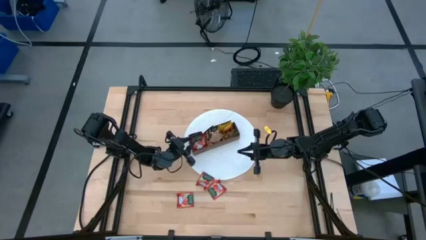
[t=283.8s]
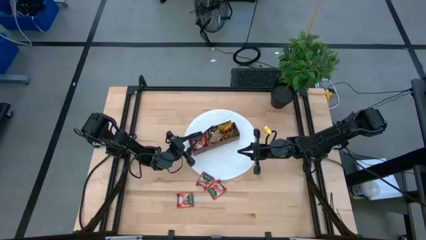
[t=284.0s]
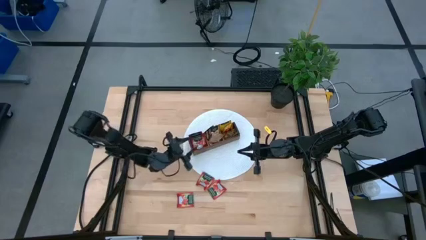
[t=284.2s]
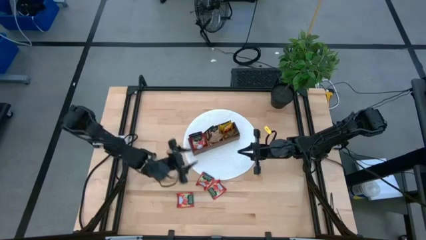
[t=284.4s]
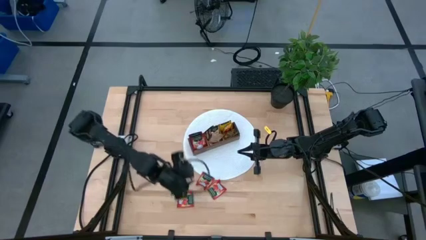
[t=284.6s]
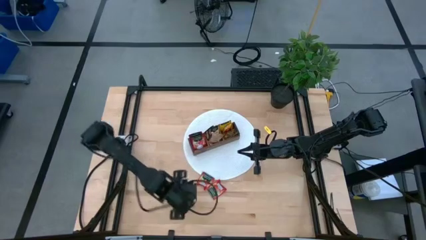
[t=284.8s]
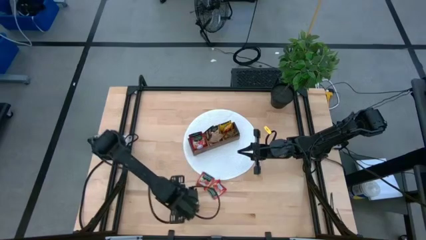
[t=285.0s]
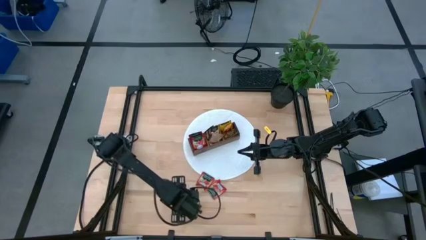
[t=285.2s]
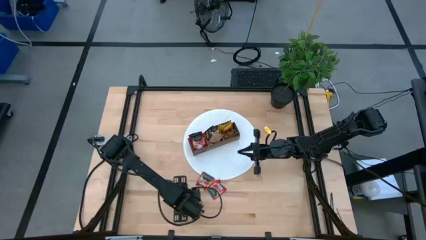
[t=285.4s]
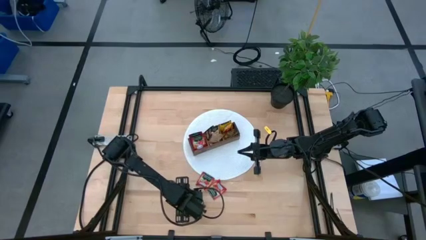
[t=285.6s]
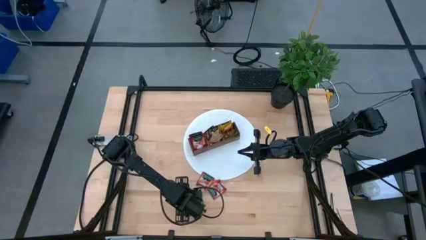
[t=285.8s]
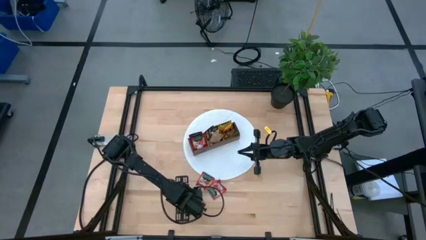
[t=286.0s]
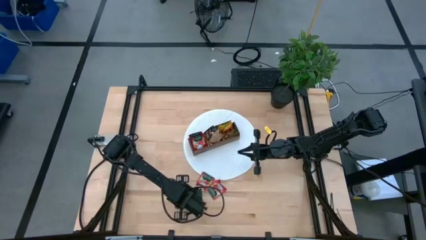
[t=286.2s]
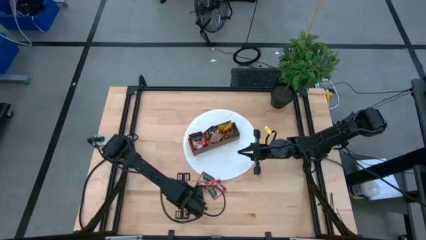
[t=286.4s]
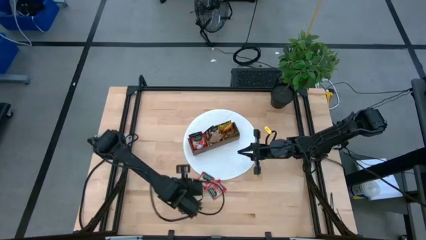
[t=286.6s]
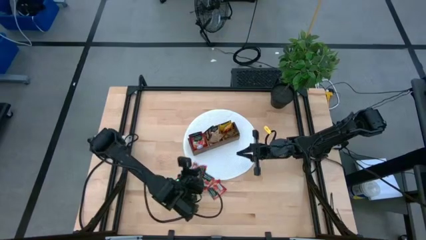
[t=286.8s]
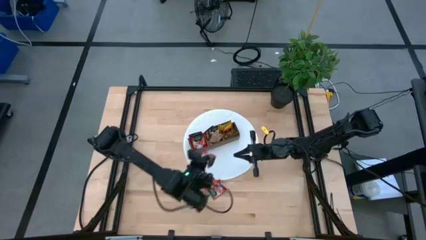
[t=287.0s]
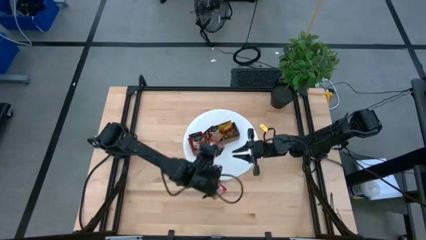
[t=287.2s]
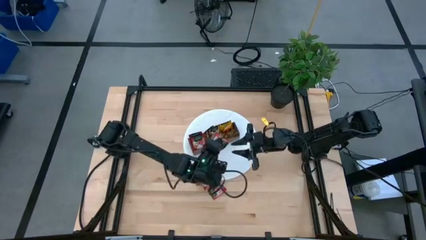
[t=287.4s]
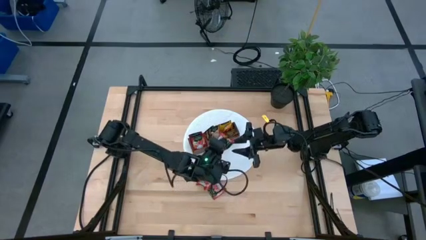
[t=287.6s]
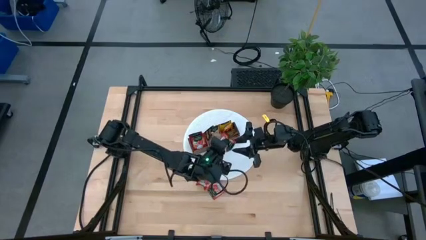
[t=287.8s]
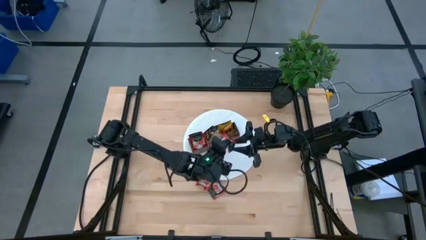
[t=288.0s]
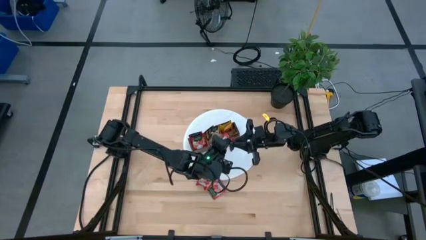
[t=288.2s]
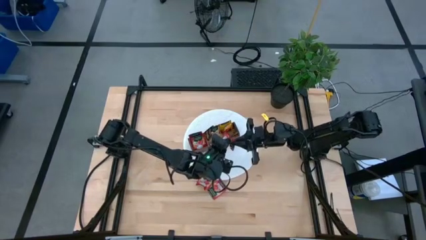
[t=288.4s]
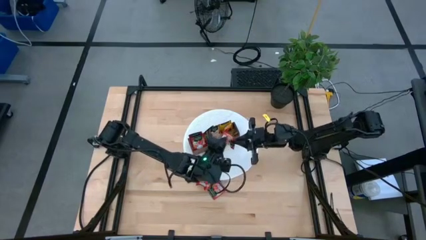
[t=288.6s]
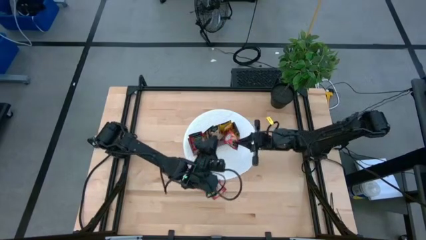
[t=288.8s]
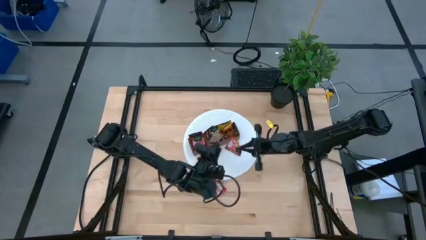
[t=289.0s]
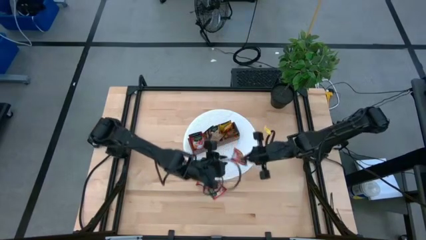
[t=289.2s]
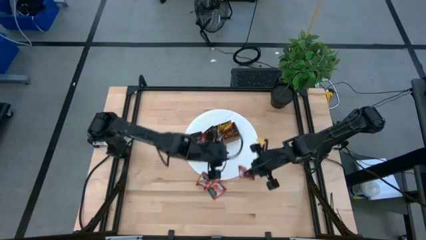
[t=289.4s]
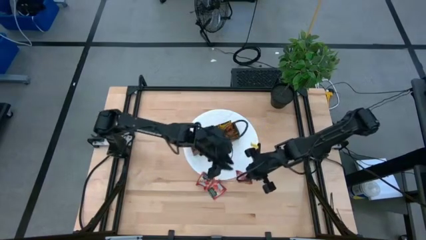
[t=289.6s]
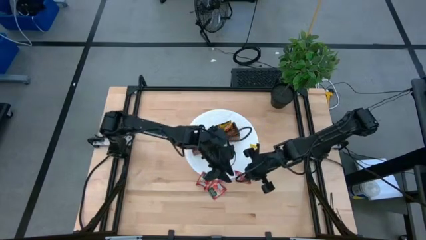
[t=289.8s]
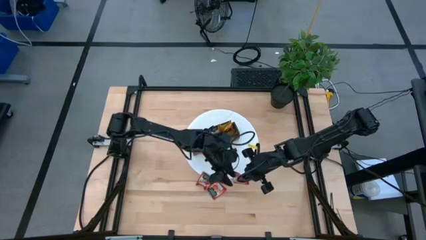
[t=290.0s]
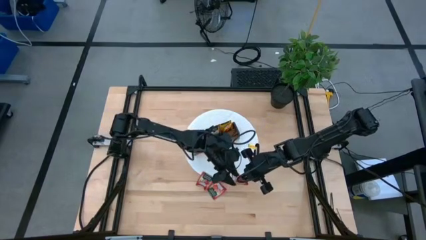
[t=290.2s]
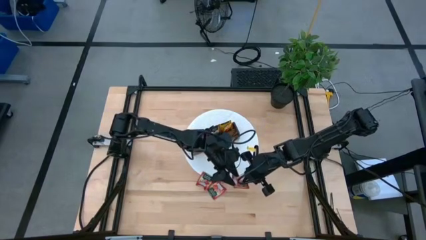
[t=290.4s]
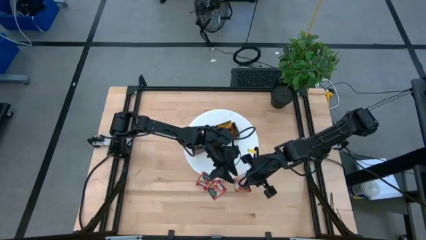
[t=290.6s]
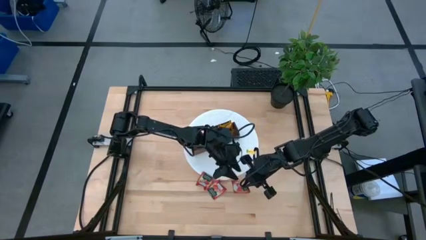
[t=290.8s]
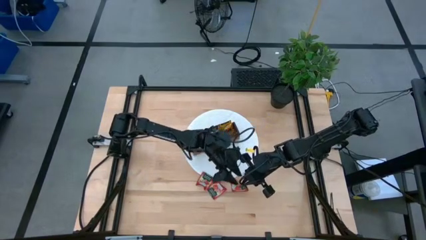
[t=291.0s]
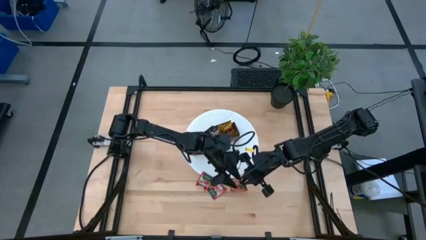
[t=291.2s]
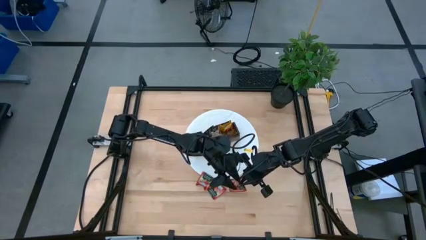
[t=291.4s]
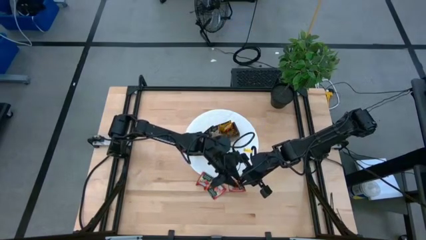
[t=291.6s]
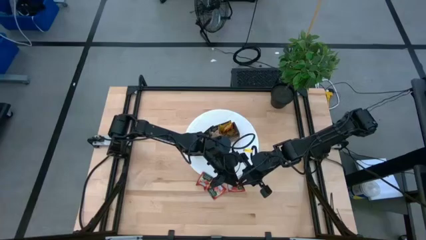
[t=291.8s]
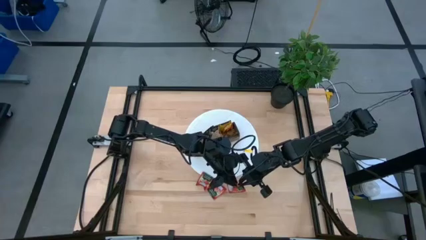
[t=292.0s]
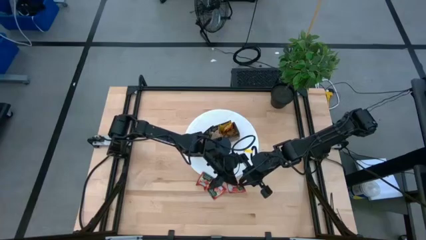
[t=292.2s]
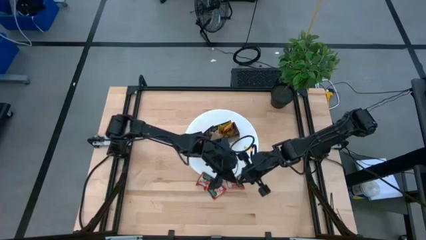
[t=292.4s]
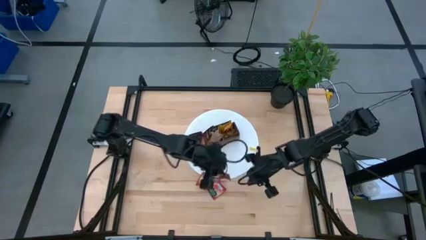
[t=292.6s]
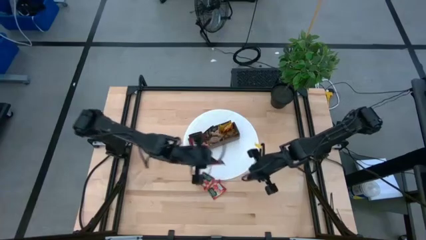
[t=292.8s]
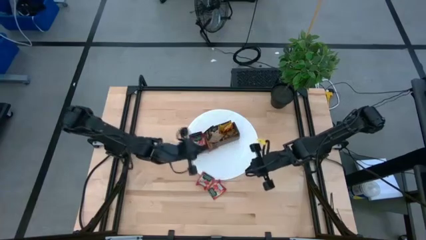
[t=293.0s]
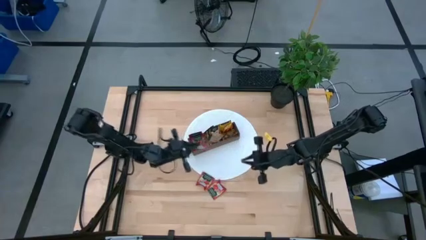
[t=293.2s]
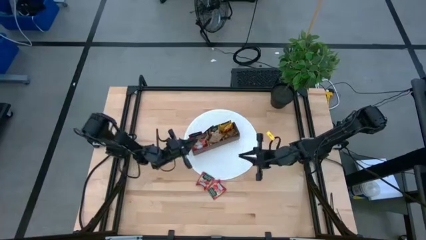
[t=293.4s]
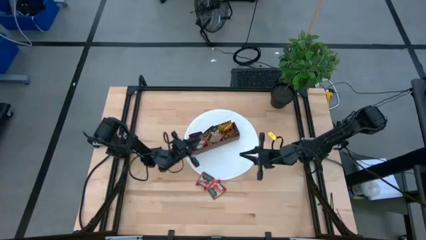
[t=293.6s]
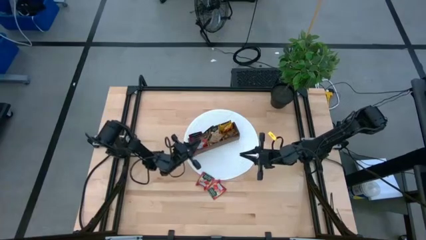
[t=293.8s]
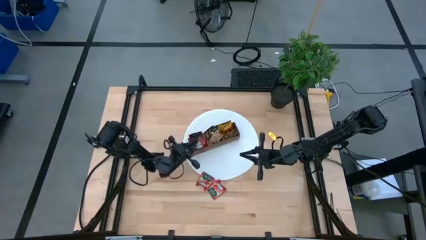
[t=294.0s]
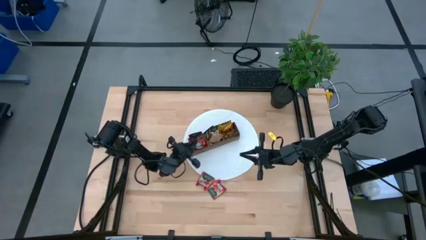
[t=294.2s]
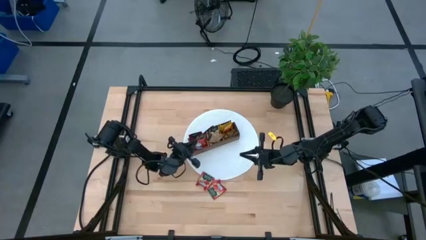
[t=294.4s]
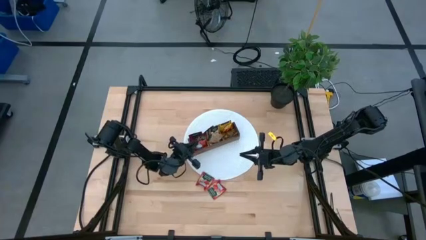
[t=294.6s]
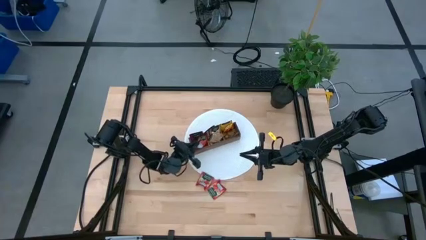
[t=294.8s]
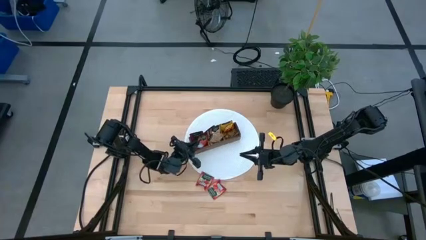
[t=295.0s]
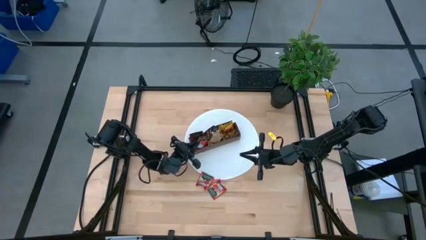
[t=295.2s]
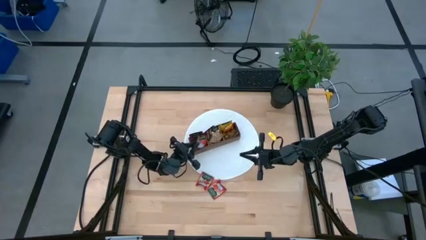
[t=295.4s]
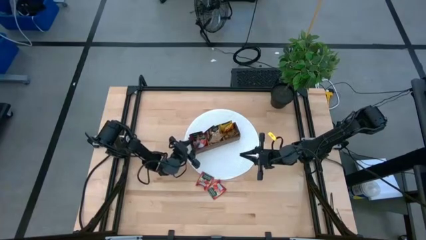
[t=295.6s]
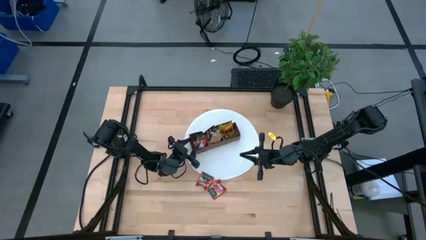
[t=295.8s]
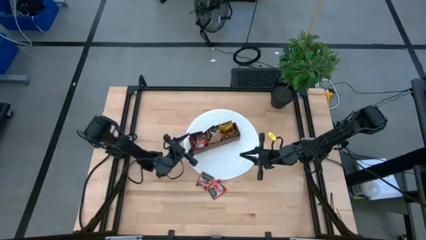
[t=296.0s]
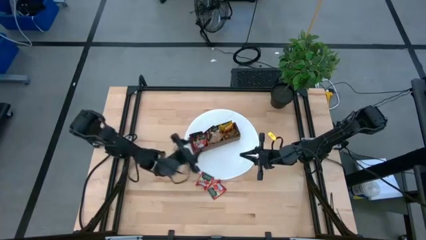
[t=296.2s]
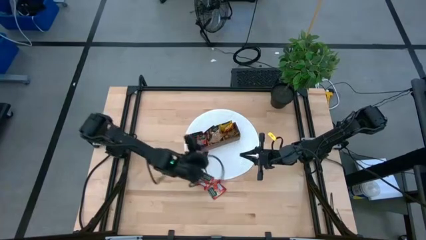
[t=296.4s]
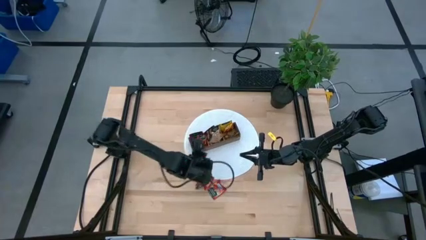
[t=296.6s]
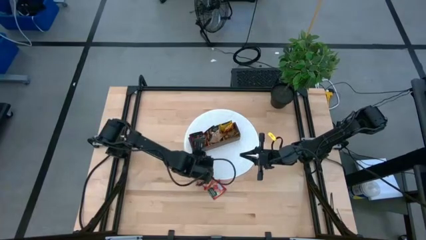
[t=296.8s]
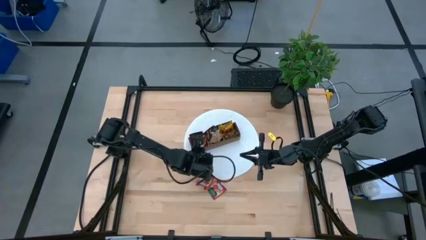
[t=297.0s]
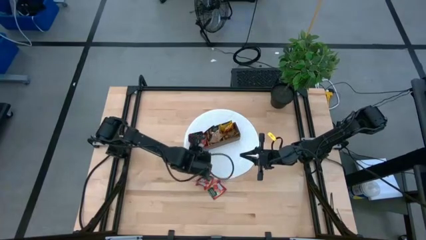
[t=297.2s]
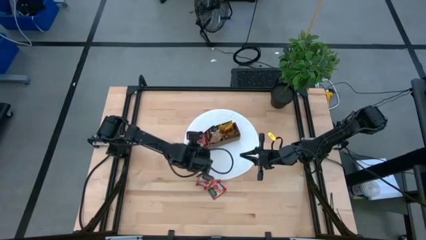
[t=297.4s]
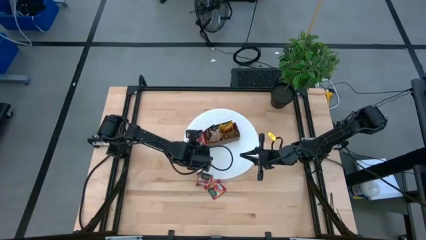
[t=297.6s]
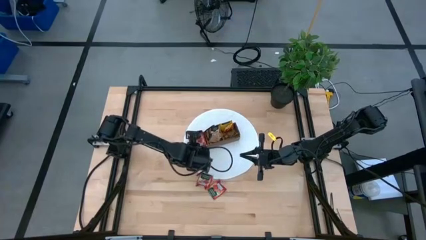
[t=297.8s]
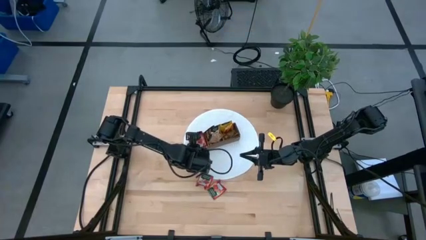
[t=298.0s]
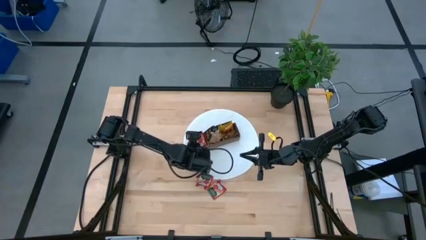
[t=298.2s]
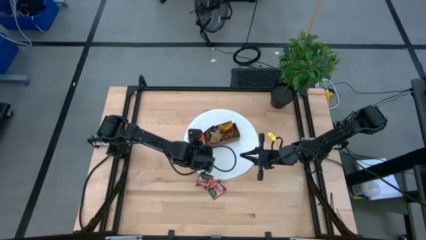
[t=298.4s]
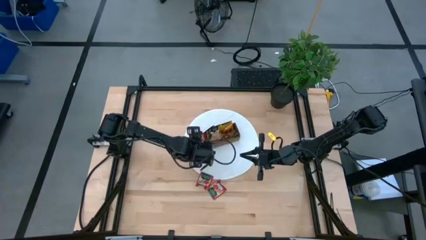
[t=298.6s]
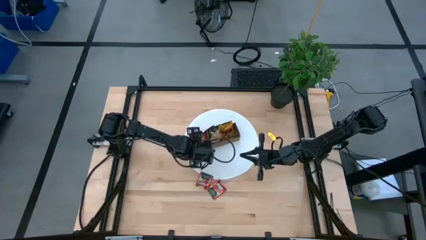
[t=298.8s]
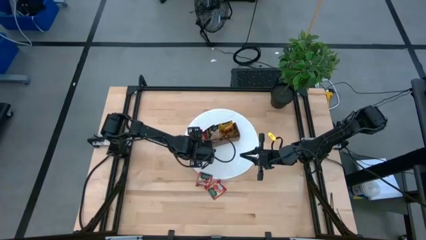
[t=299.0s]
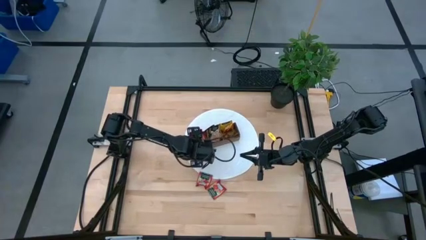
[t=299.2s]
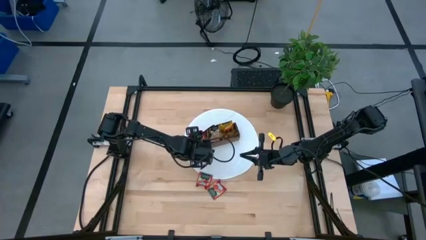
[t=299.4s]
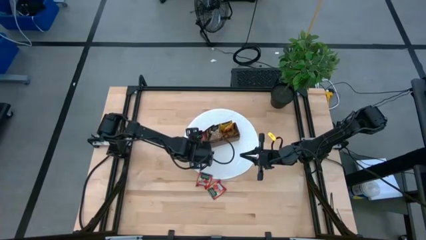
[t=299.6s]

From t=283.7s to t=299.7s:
Task: Pick & Place Tea
Put the red tea bag into the left section of the wooden organizer
